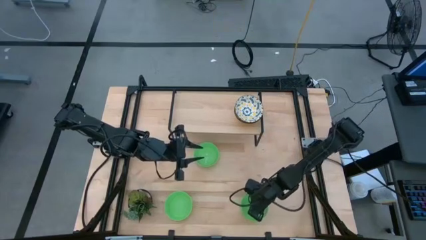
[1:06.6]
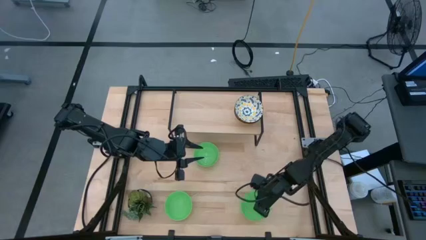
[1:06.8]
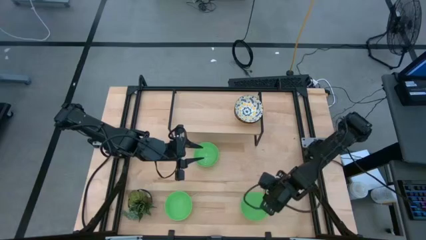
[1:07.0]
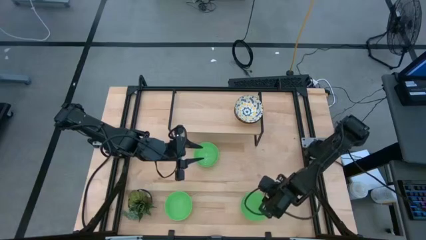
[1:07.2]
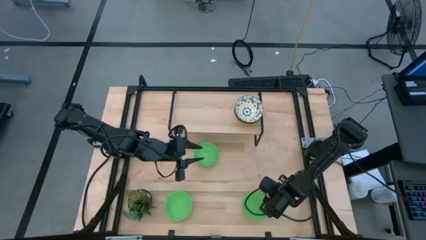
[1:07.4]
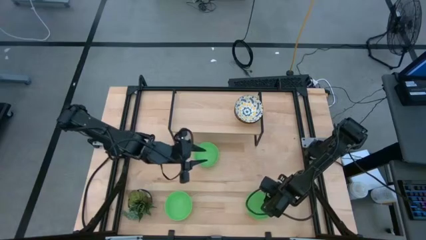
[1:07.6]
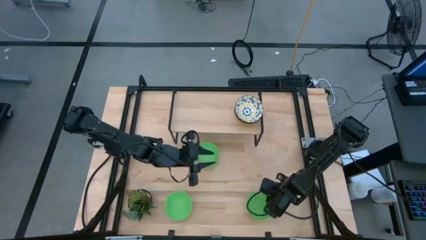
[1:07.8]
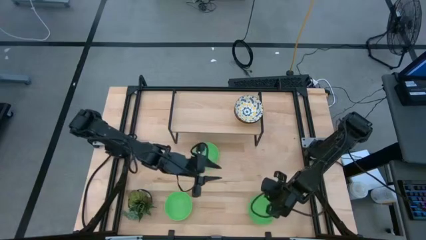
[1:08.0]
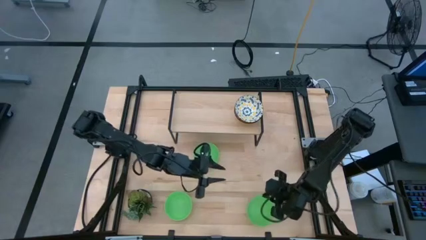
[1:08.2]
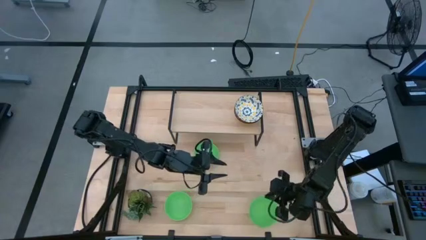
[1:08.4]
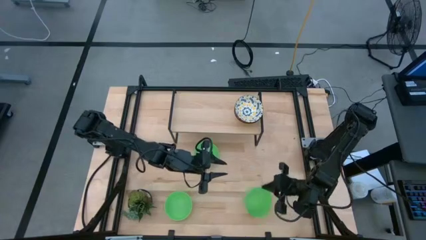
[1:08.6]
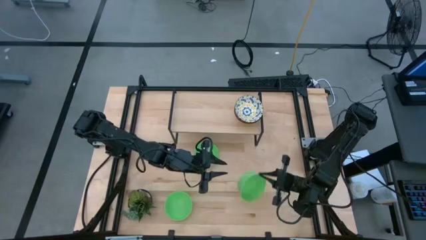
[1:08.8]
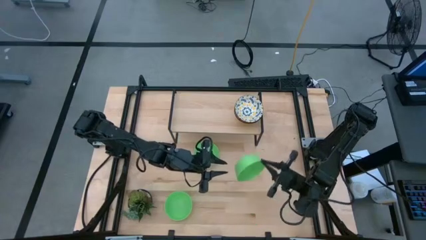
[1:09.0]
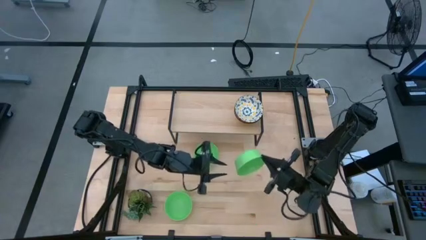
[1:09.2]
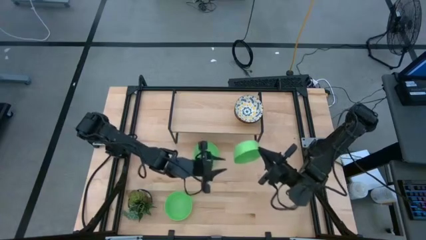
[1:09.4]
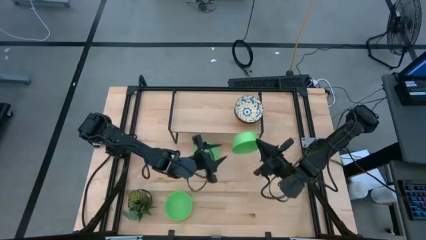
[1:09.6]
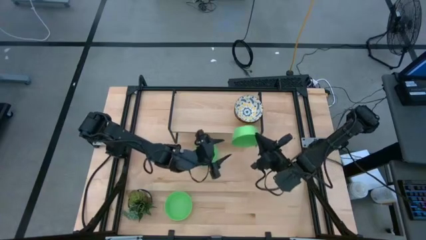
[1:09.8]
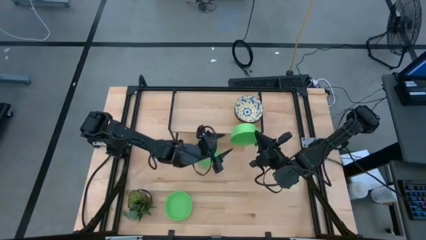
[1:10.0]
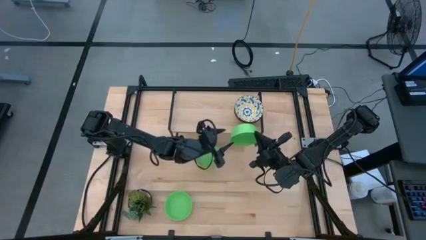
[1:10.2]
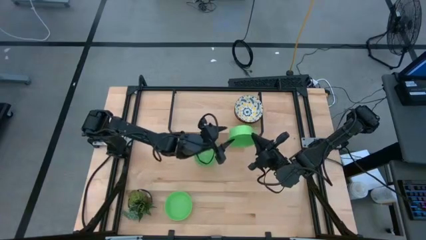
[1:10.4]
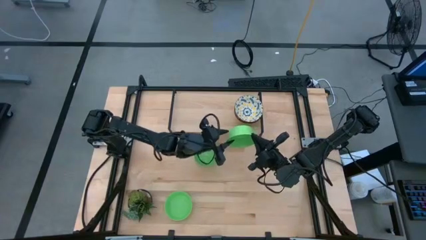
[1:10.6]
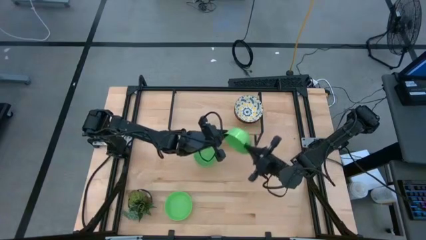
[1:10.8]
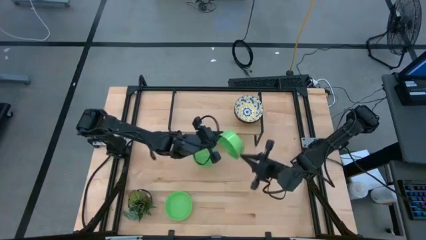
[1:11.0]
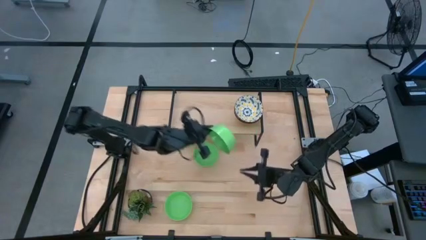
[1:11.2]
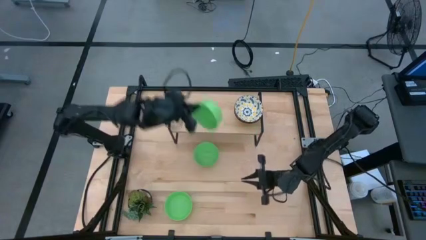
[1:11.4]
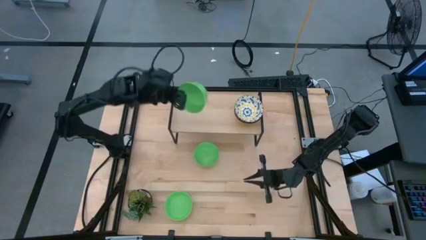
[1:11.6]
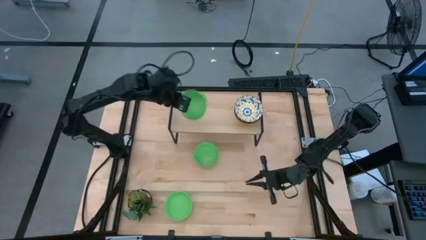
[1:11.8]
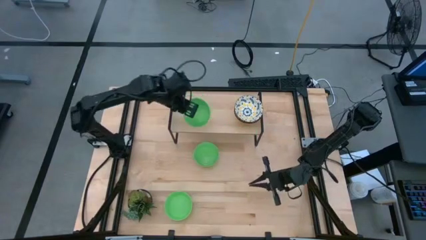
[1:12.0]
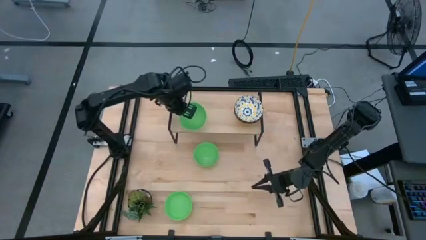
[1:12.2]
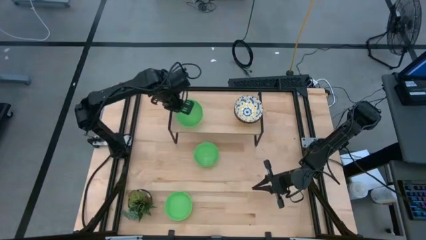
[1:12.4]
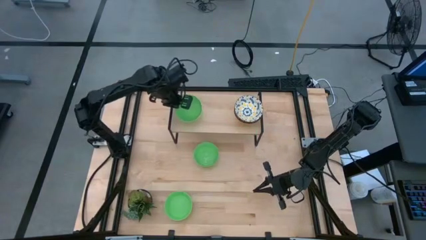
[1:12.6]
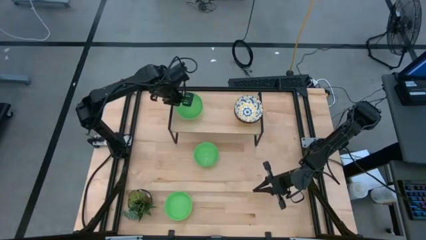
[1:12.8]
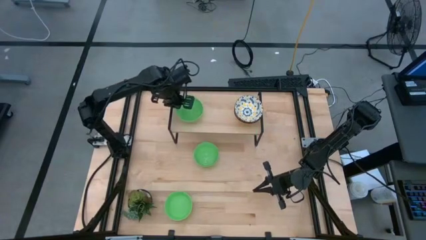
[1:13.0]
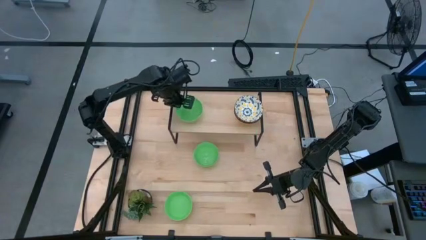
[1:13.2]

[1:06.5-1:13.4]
Task: Pick & Place Mini bowls
Put the bottom right green bowl on the shelf

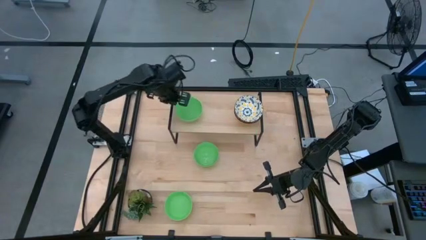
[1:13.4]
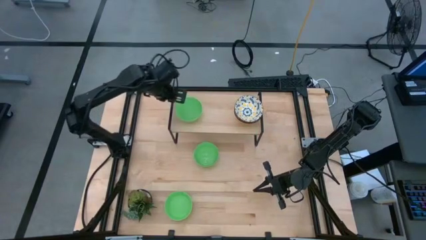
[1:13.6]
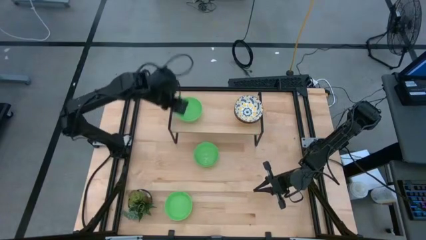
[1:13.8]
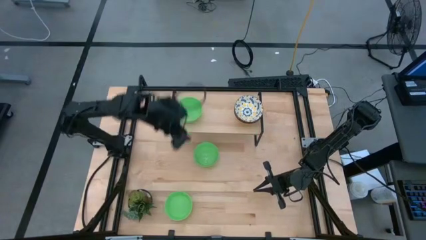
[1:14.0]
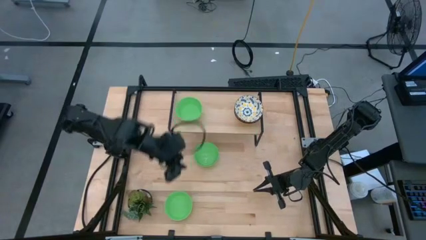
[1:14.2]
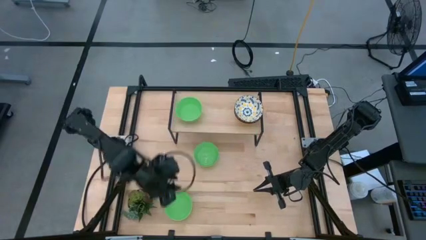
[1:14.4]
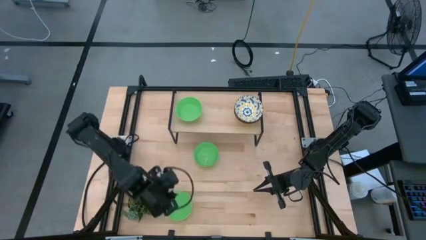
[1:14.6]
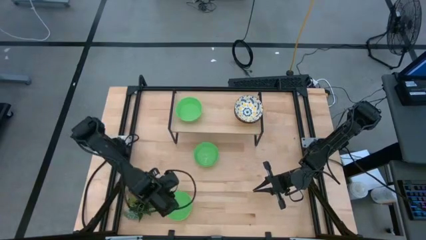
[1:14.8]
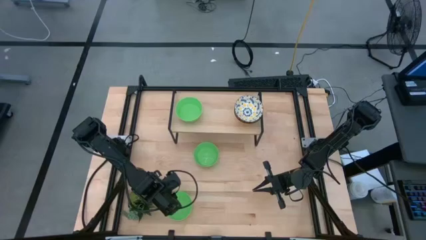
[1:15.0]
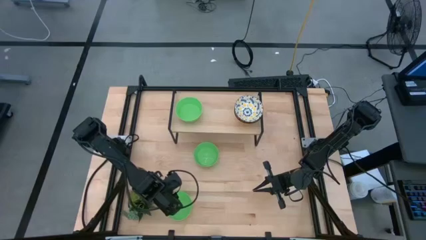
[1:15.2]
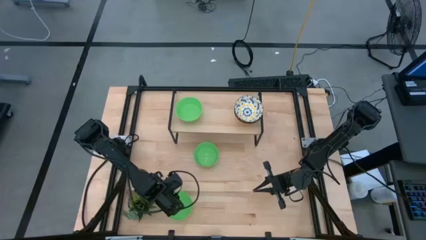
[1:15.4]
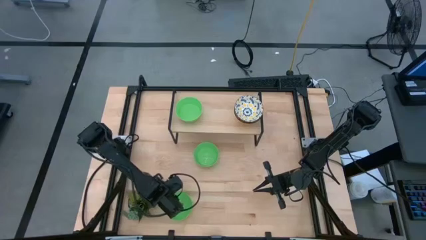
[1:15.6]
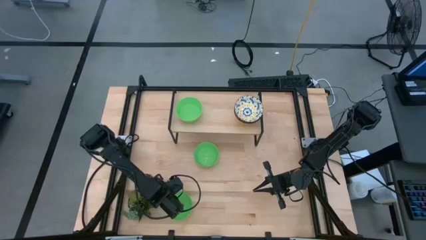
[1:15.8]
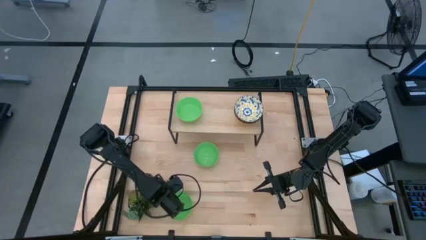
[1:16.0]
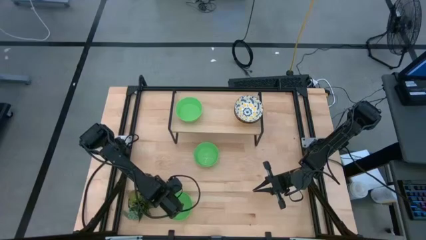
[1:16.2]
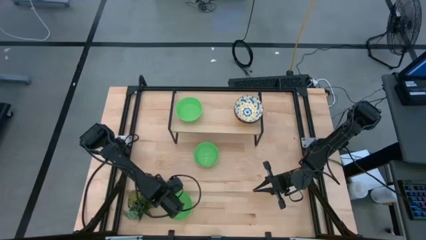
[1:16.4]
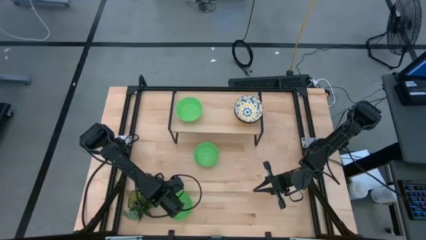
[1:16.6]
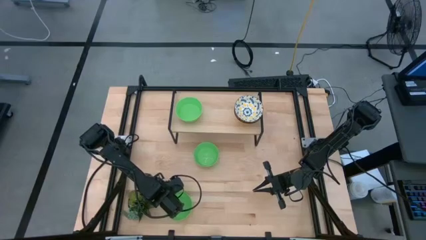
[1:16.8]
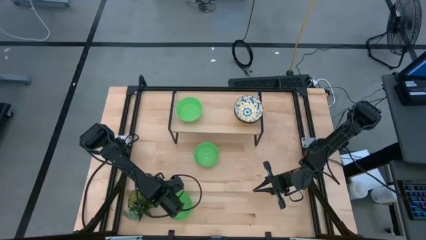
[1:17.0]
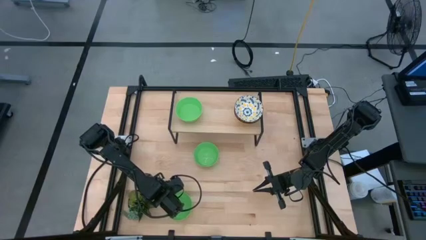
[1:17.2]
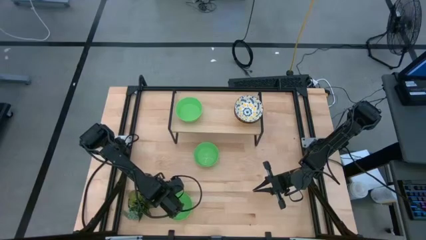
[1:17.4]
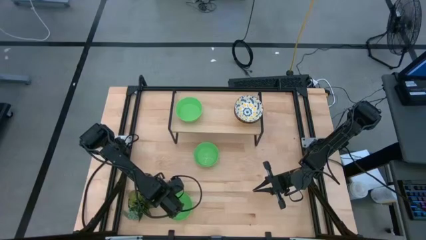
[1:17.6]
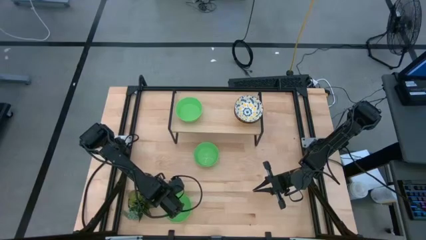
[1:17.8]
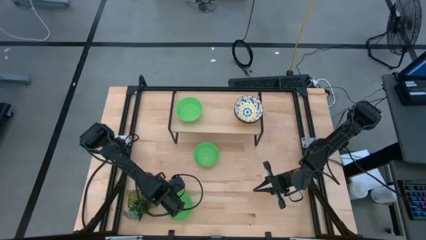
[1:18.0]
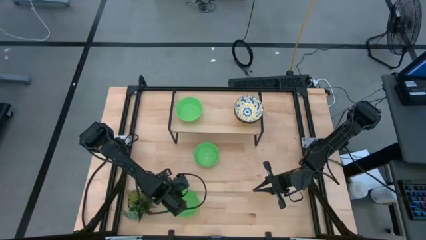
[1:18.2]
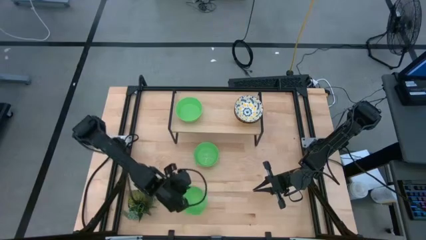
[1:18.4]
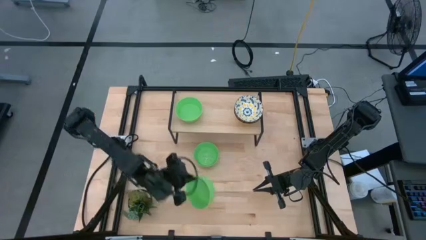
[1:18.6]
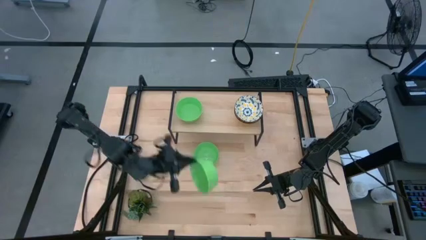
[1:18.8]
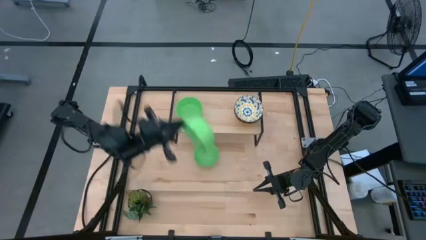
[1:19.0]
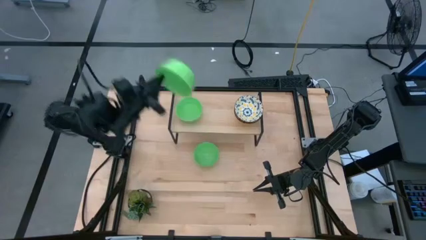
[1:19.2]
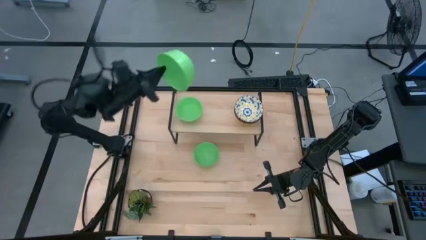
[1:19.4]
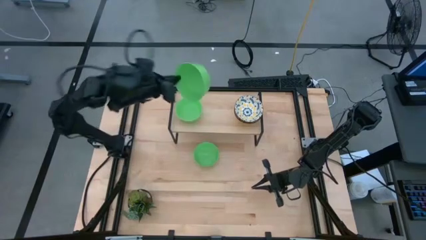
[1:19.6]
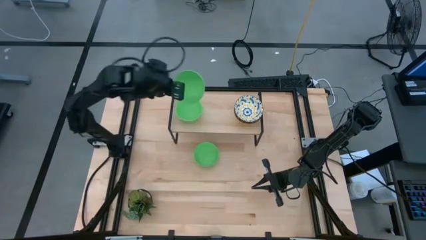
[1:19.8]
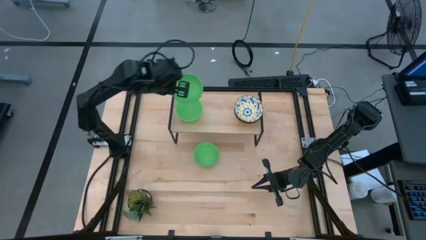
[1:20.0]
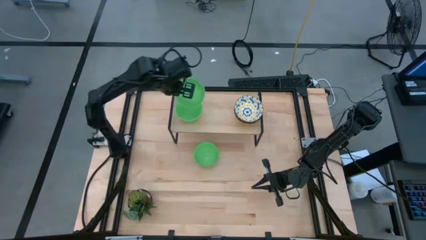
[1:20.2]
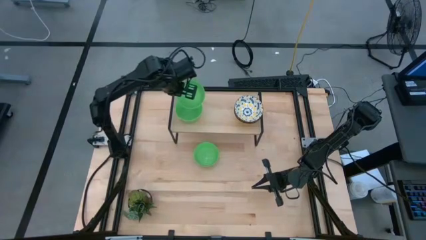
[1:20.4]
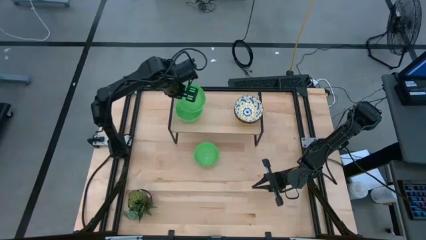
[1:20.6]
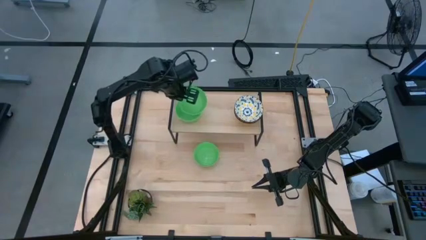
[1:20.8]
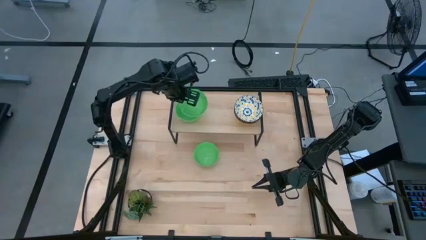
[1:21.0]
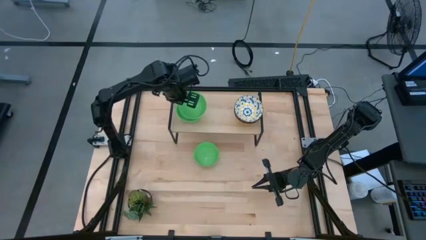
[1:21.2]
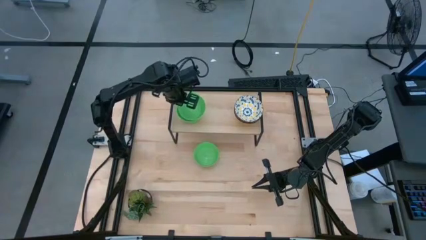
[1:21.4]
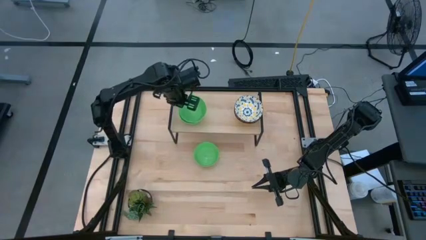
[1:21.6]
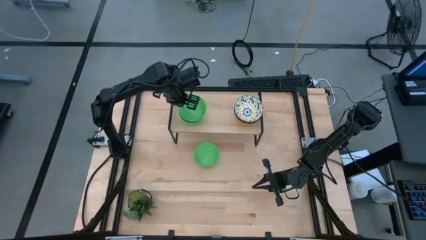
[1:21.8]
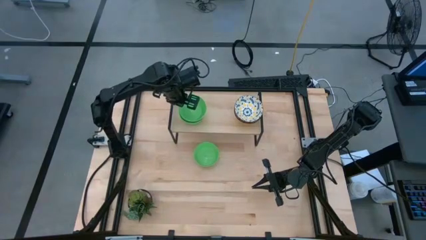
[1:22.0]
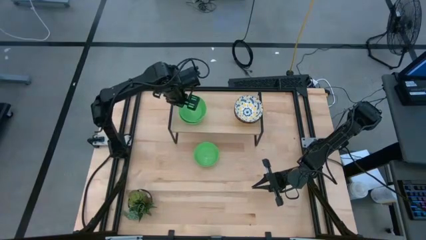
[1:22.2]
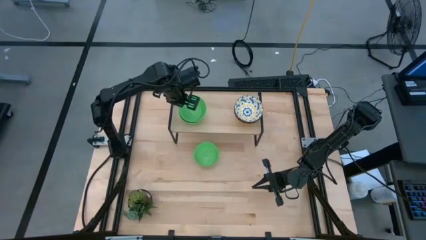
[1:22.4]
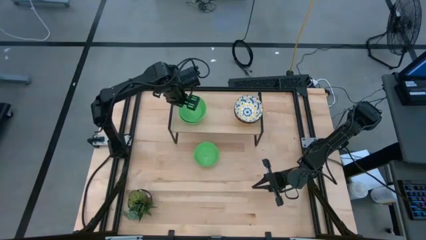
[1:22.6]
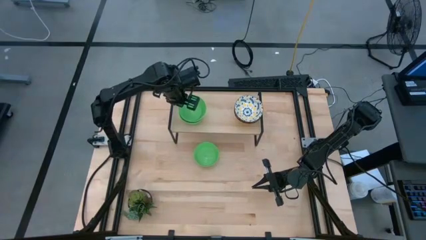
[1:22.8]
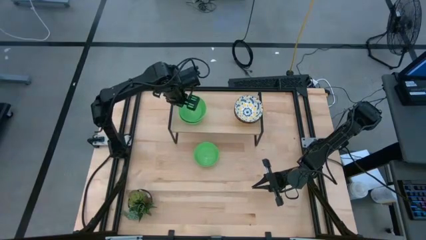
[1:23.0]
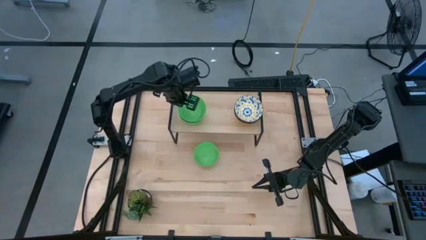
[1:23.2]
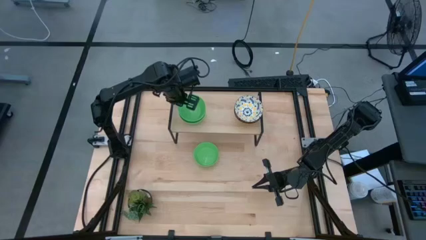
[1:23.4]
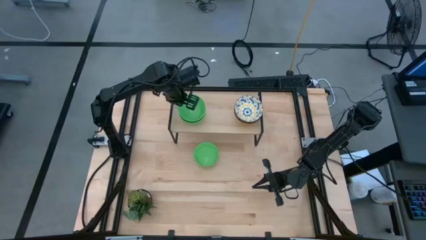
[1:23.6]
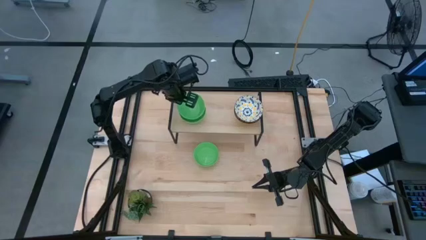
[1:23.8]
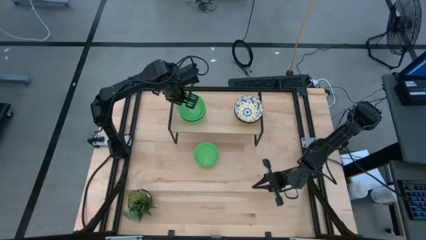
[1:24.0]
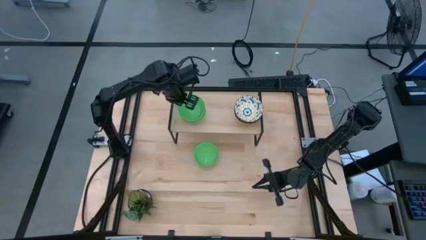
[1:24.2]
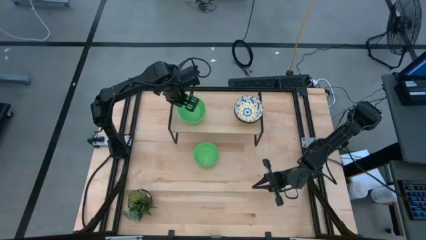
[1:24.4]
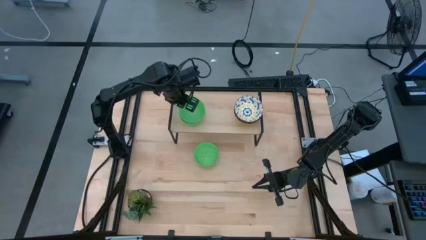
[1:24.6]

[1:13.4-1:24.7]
Stack the bottom green bowl on top of the green bowl on the shelf
